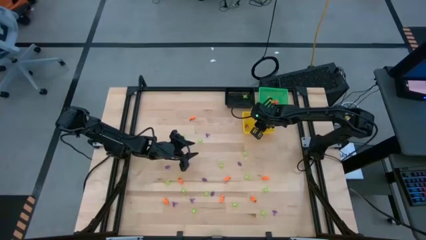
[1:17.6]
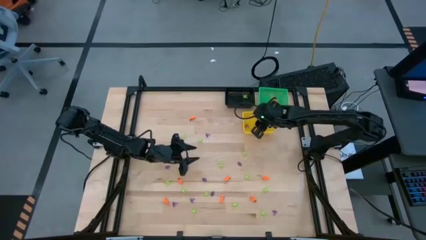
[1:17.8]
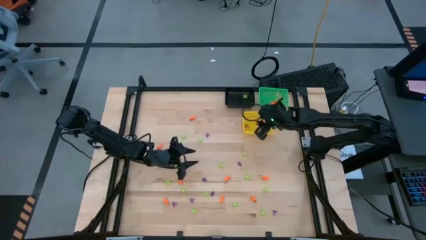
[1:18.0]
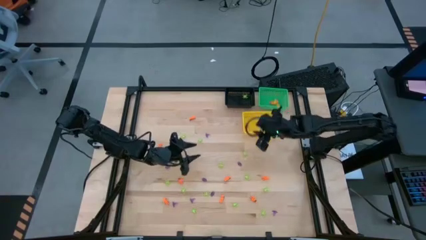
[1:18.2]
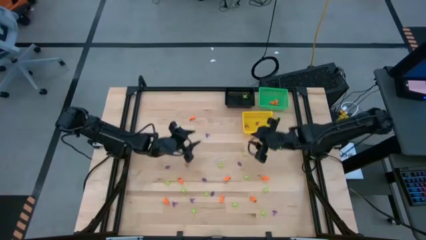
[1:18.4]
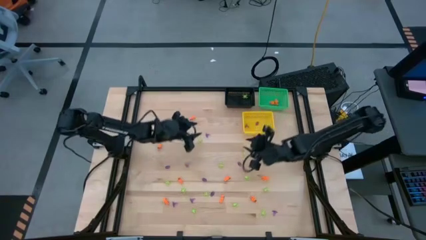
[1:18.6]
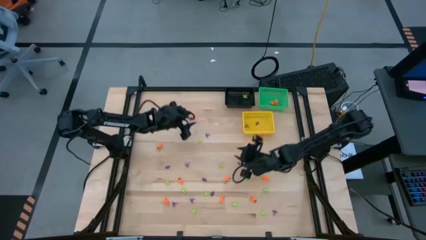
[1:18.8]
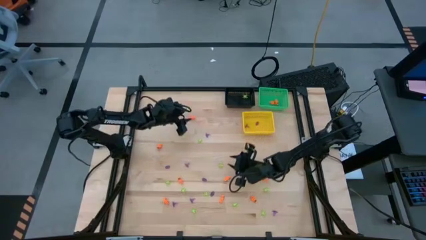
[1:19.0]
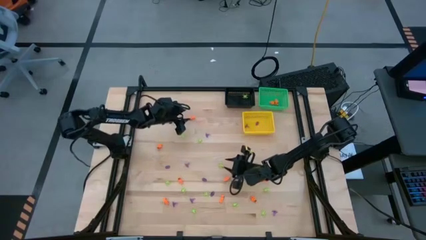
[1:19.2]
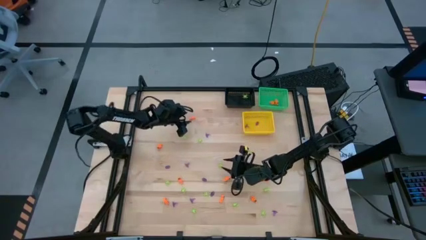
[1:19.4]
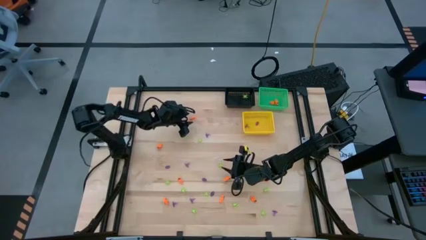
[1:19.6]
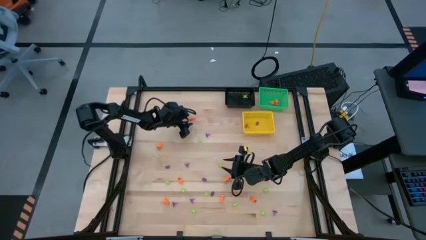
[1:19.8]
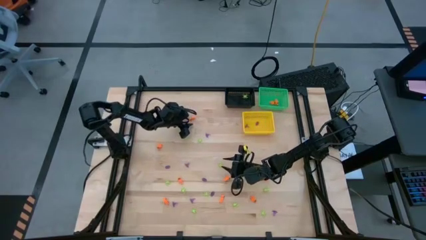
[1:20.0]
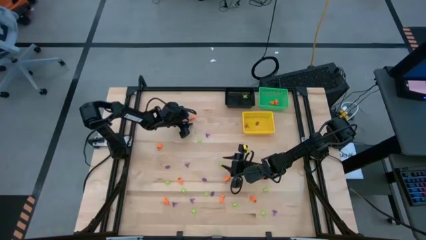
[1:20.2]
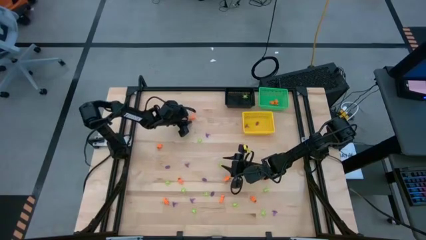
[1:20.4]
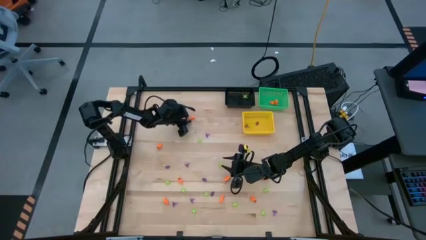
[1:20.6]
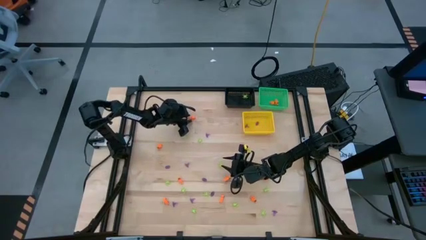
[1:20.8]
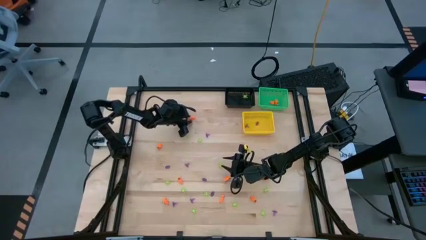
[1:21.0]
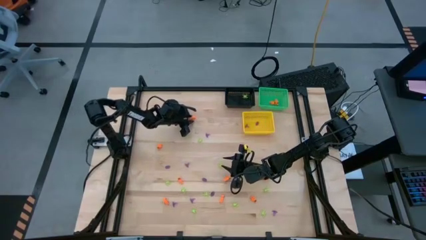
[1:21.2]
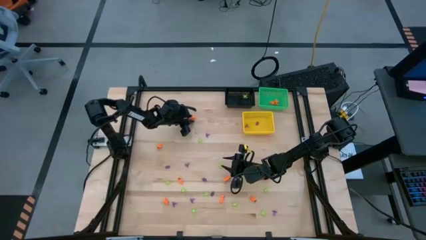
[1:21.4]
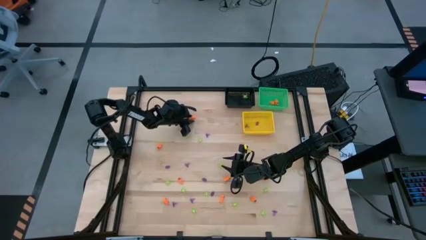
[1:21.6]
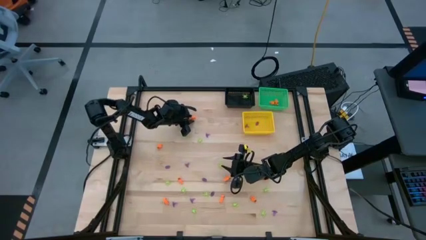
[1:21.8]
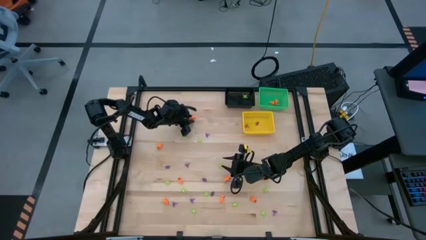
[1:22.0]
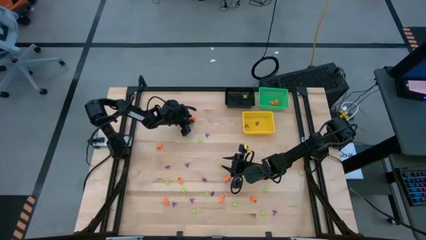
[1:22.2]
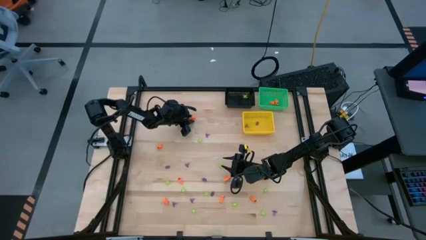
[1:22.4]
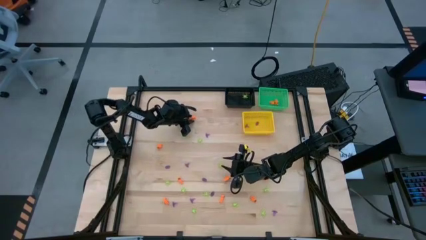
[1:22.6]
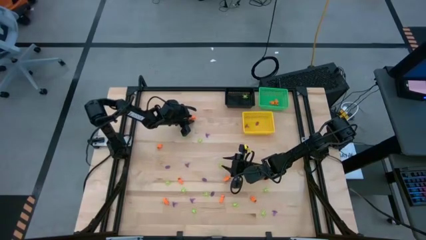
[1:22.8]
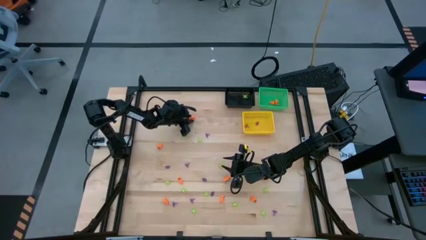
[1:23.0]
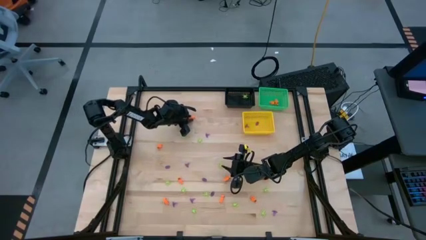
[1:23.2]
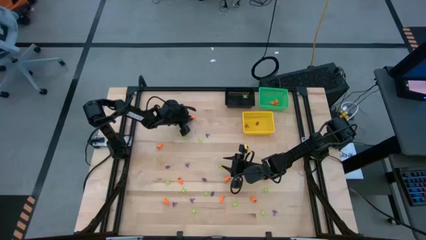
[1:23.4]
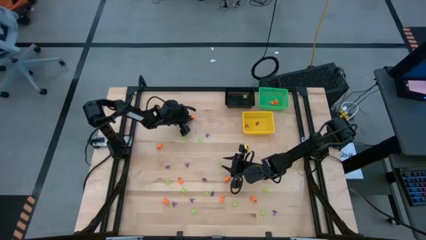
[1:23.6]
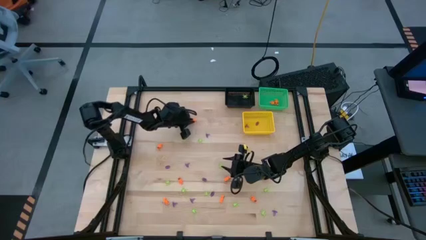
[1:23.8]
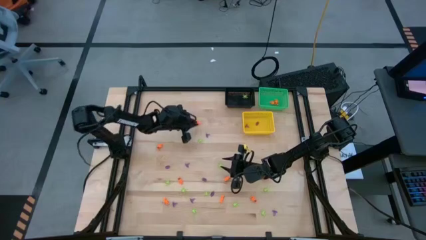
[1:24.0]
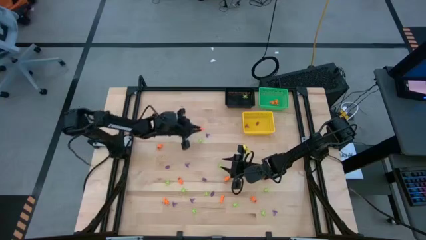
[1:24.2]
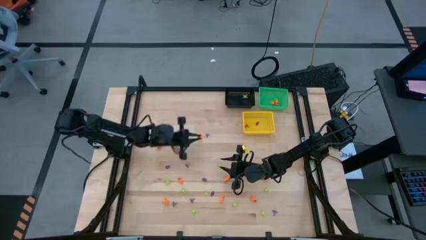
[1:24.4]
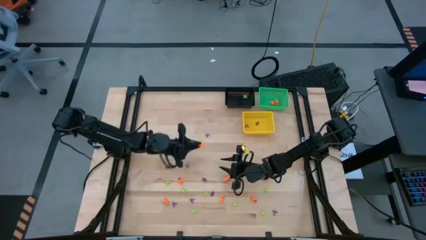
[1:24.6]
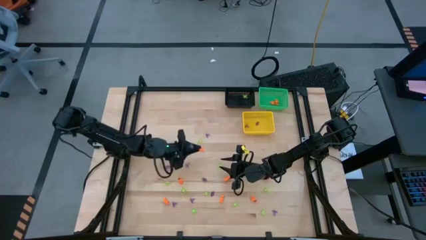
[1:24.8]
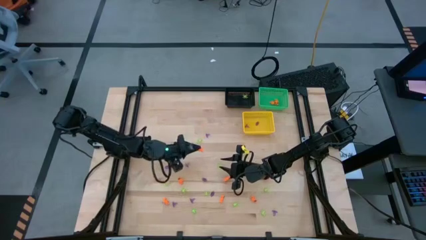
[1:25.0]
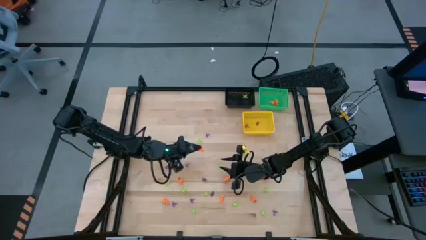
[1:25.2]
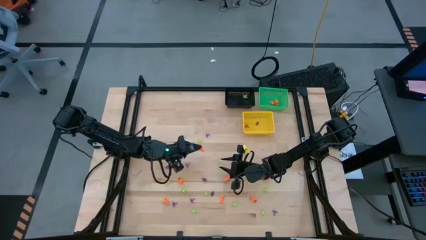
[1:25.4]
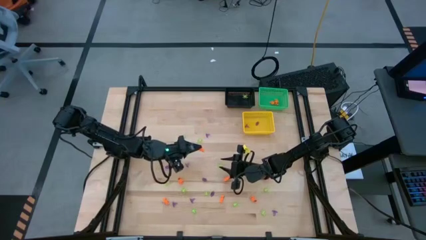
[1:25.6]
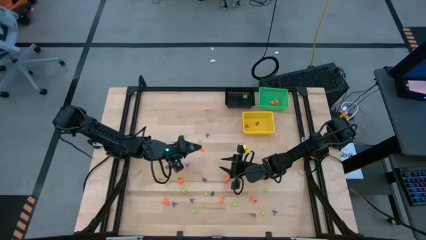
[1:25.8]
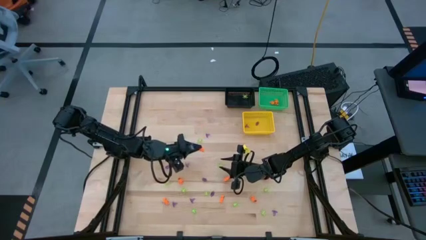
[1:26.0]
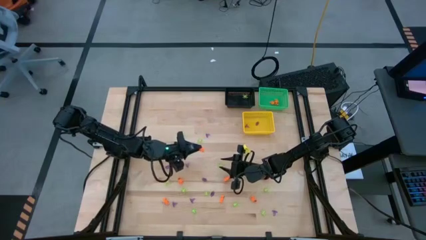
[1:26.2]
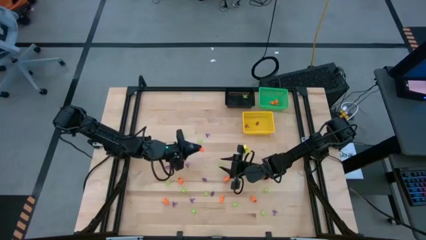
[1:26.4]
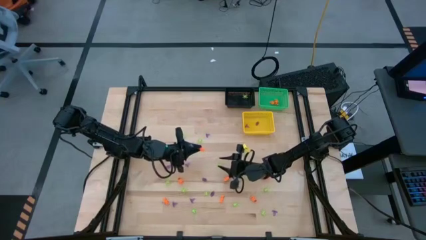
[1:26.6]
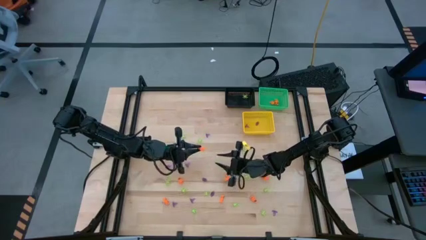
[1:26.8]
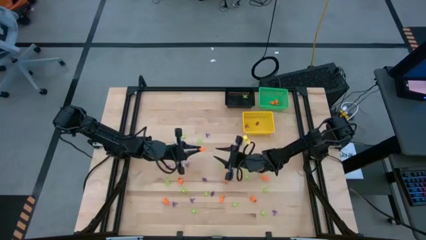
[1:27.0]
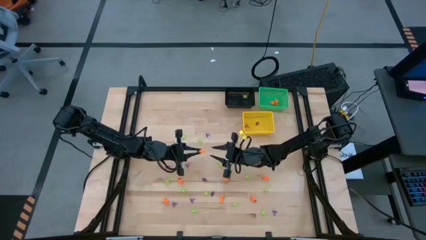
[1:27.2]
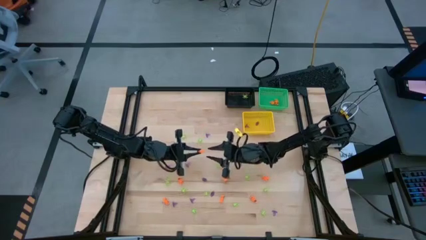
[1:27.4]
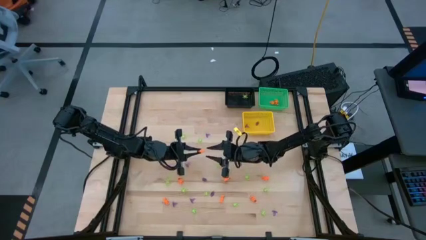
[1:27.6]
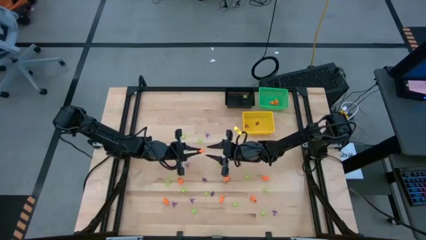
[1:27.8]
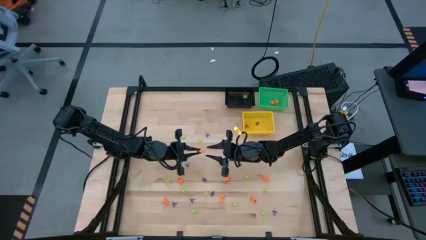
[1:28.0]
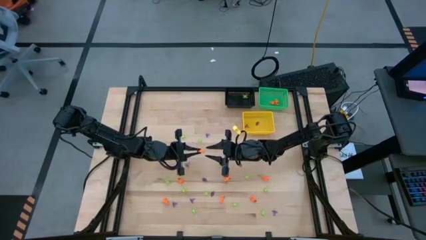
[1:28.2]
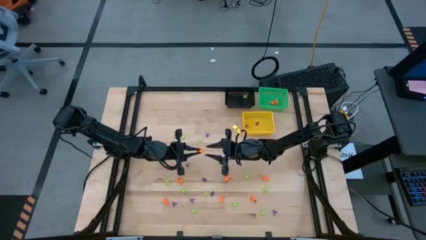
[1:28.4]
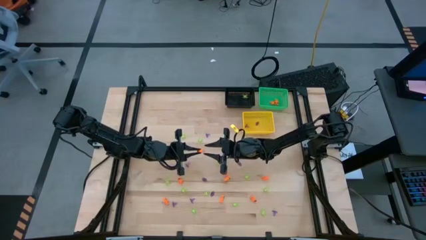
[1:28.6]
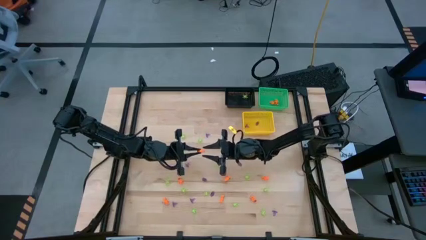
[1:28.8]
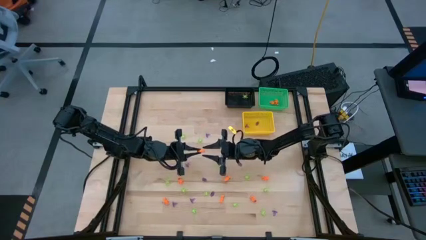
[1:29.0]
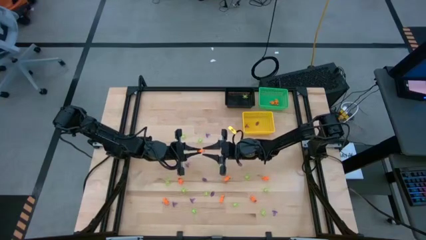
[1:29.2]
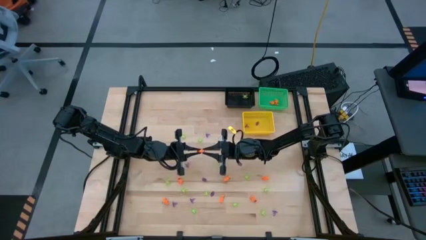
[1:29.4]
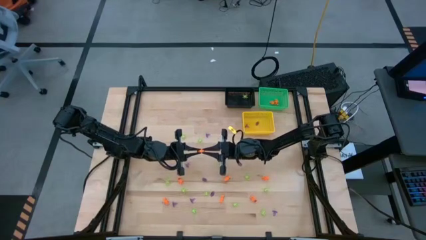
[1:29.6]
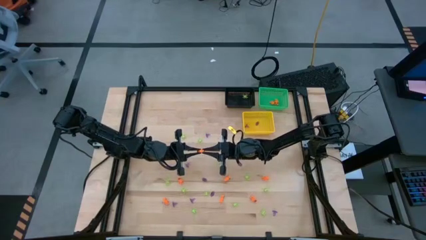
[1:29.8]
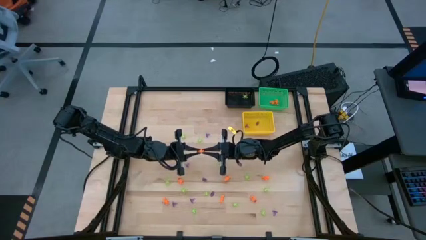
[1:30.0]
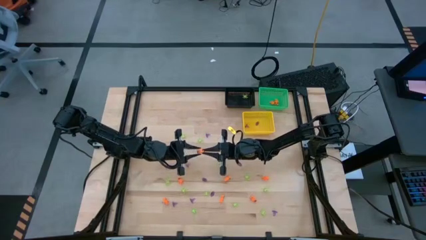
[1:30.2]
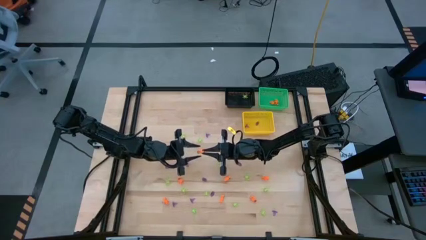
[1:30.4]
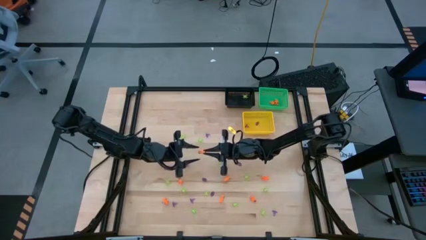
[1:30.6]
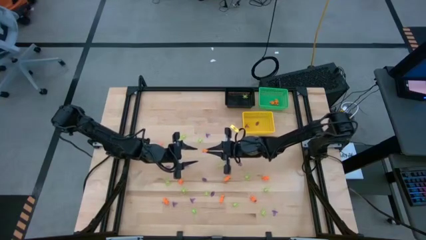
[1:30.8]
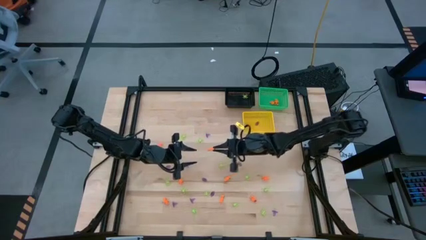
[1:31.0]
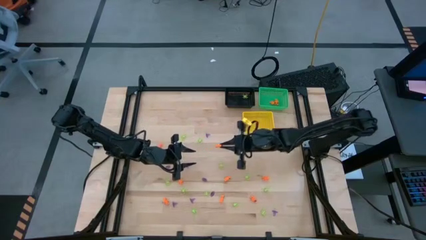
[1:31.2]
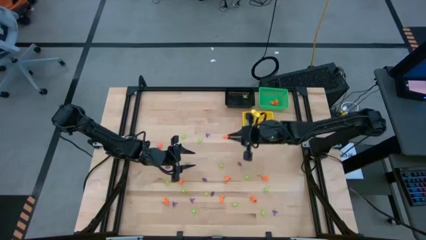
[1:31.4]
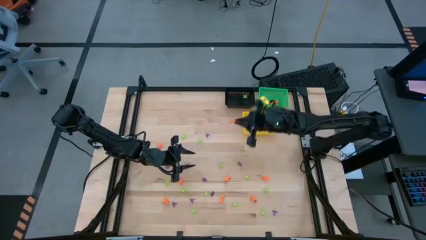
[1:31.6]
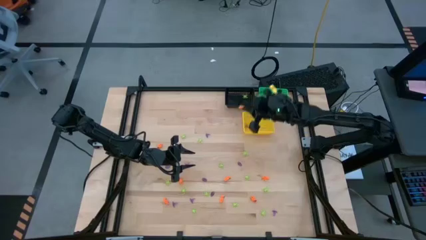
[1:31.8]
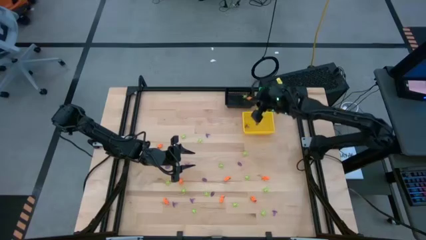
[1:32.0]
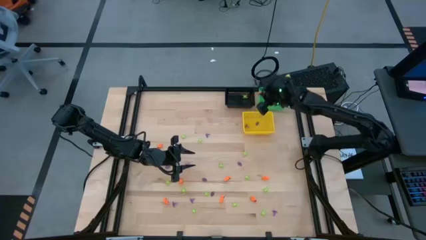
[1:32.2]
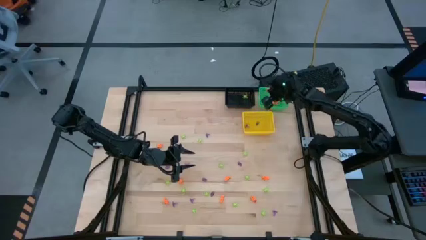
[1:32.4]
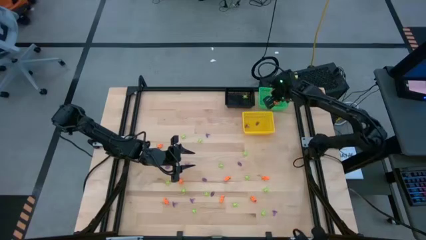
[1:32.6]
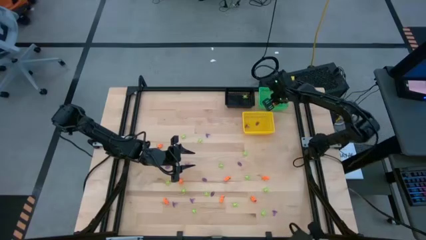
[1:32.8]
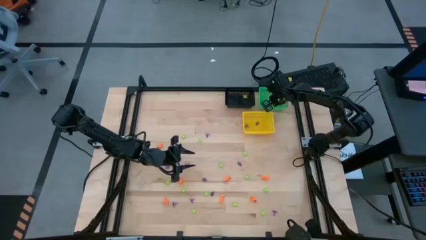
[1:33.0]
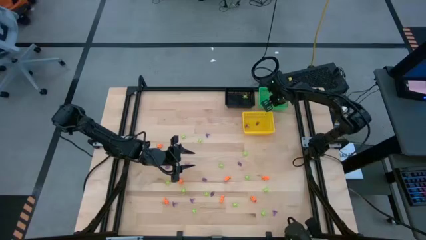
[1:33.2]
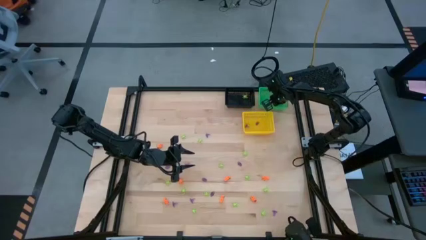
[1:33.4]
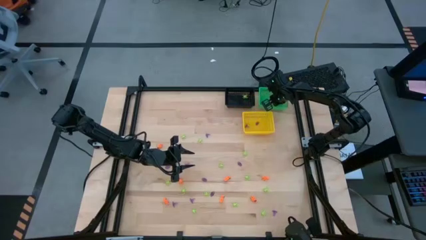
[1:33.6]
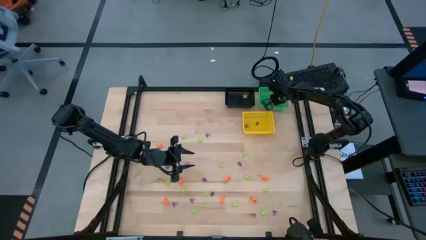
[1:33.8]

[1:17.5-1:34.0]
Task: Sort Halloween decoration
Put the orange skeleton toy into the green basket

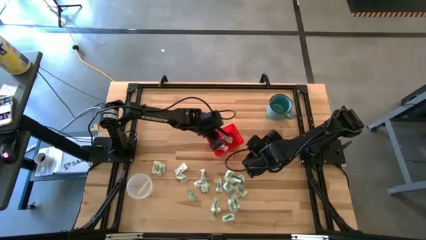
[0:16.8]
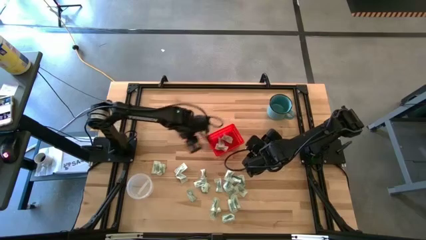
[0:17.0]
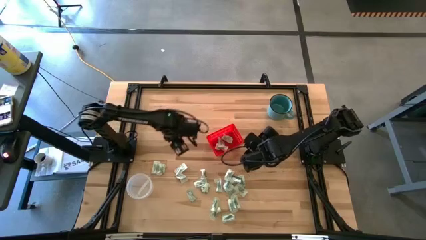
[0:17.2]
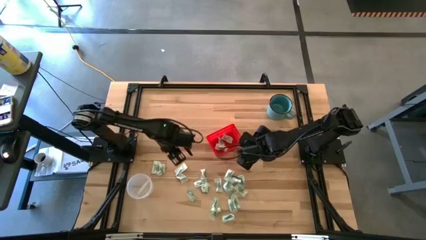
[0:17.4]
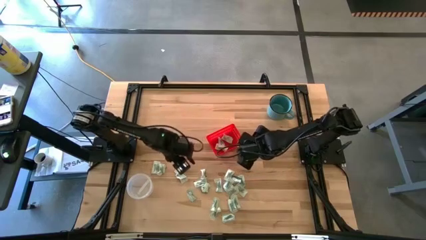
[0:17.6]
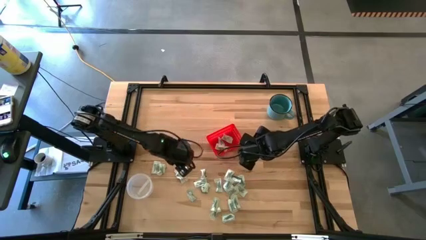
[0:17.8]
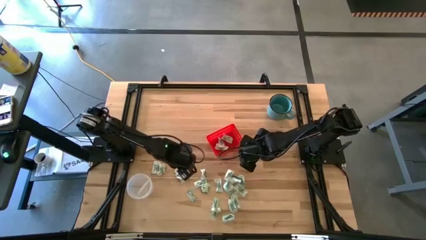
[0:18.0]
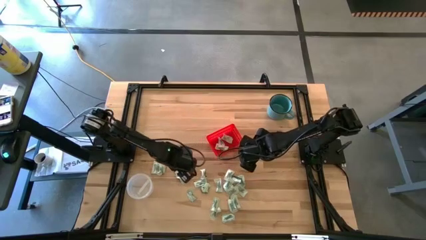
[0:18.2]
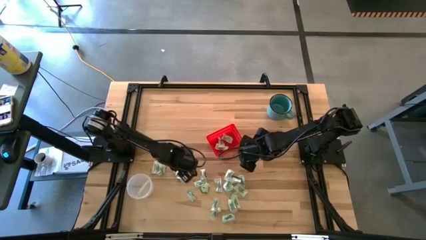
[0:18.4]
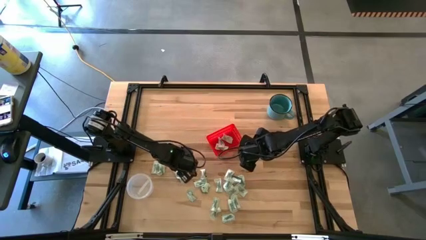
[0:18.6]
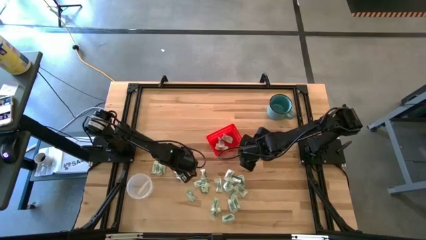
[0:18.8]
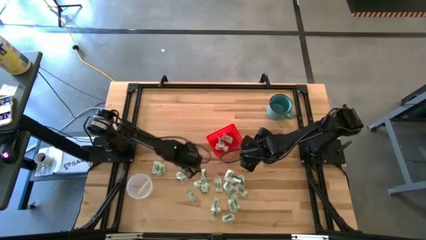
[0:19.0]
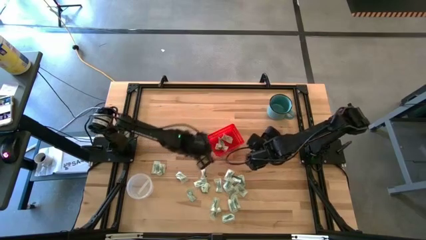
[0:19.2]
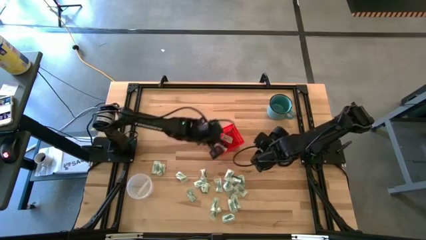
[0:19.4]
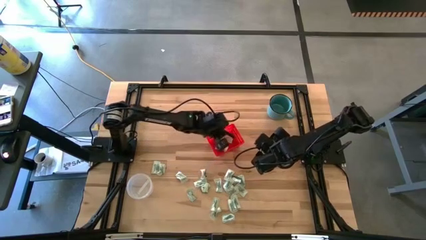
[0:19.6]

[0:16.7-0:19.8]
Task: Pick and place items into bin
Put the stevia packet into the red bin
